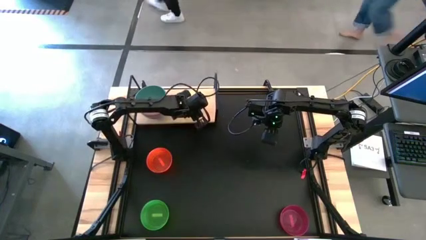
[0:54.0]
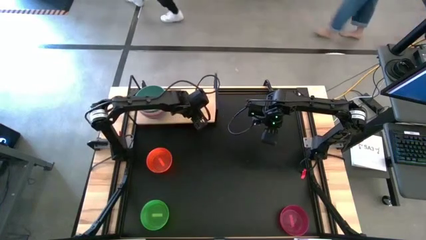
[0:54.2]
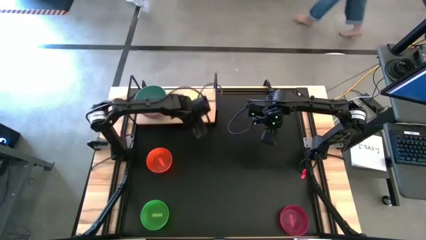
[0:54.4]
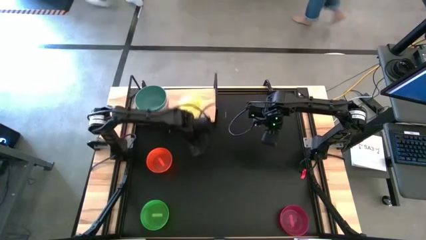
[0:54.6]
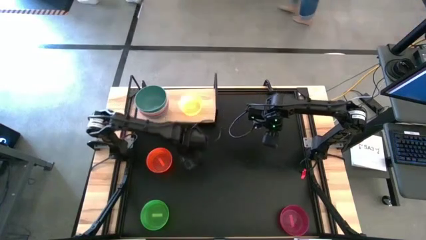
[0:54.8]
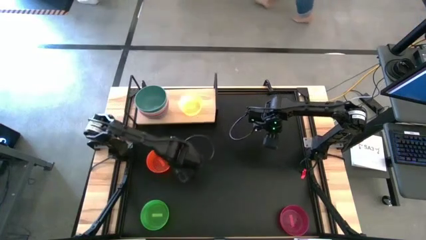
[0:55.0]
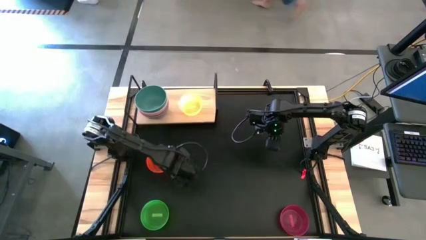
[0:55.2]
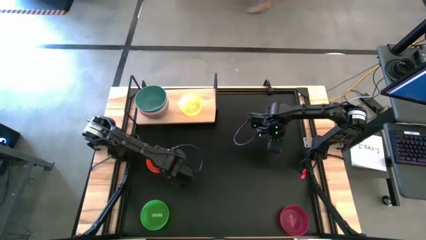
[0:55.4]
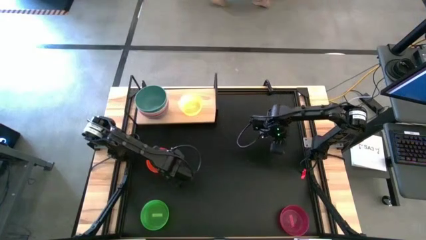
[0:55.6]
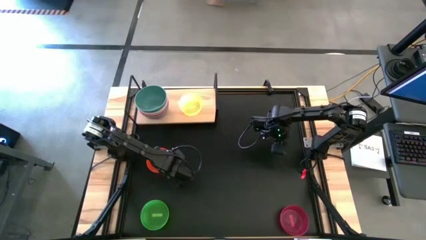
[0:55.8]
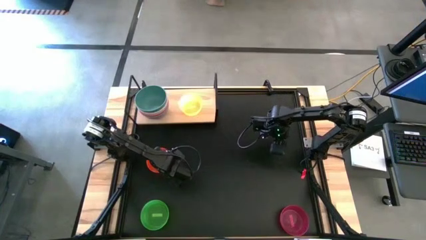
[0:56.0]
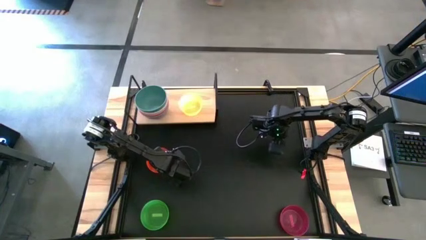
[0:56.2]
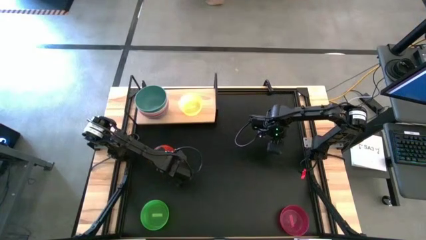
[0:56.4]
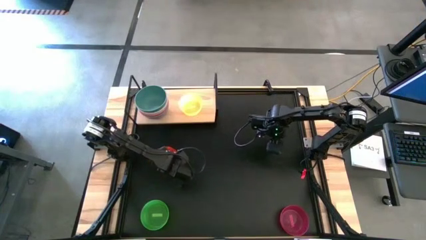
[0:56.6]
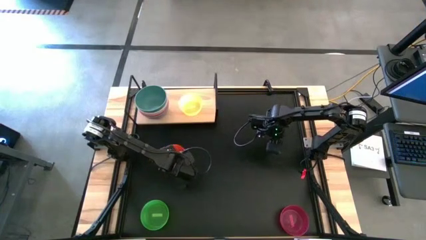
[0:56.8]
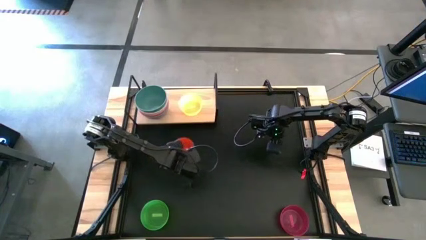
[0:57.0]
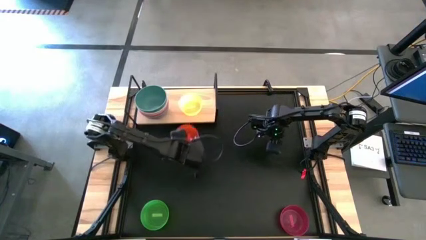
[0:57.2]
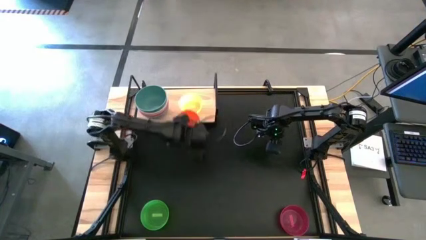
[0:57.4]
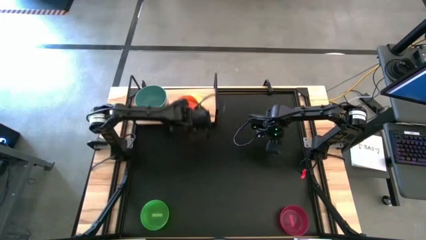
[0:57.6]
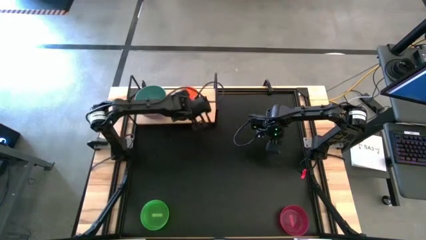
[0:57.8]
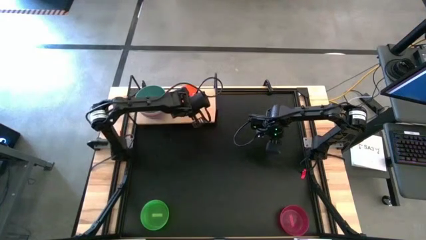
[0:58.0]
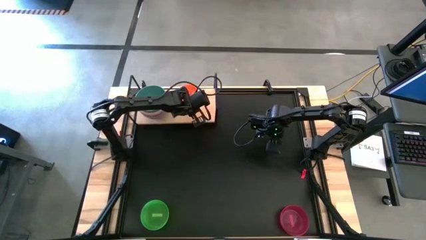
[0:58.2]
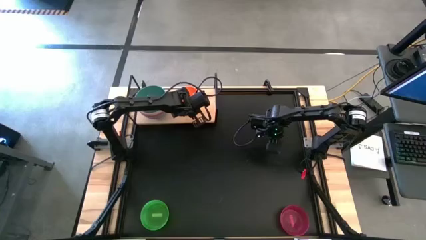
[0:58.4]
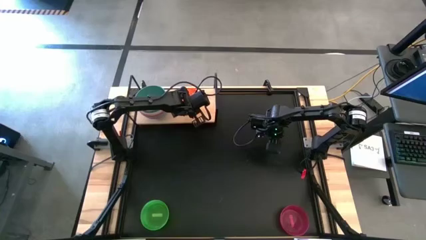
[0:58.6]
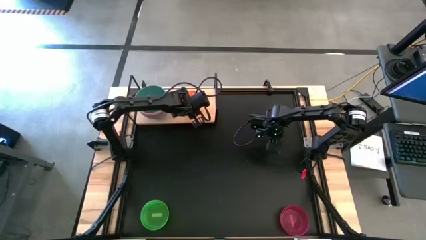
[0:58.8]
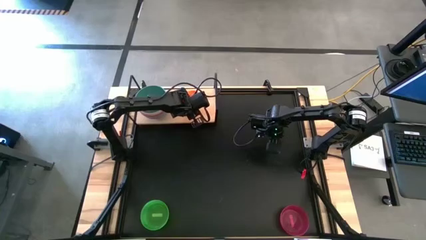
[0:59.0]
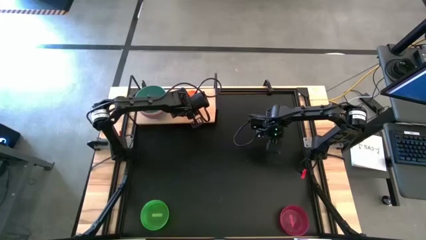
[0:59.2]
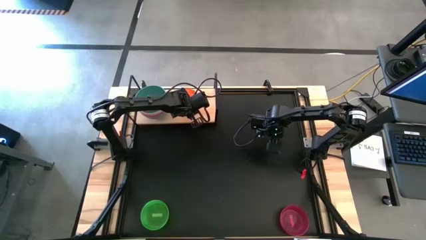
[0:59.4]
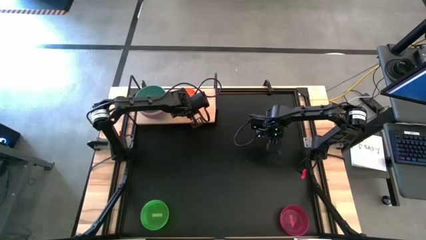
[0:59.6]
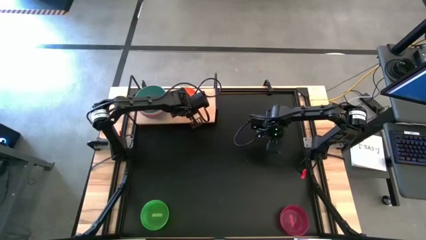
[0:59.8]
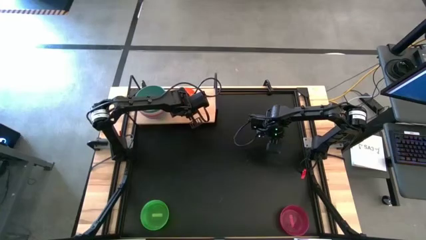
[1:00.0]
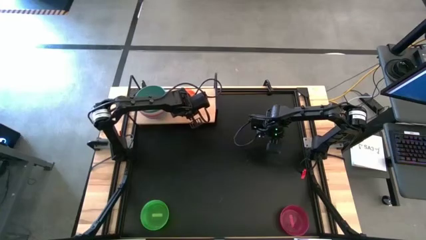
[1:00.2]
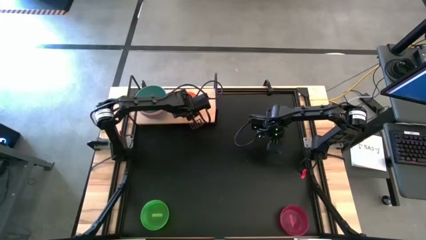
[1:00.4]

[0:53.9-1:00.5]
Task: Place and stack bowls onto a shelf
Stack the orange bowl on top of the yellow bowl on the shelf

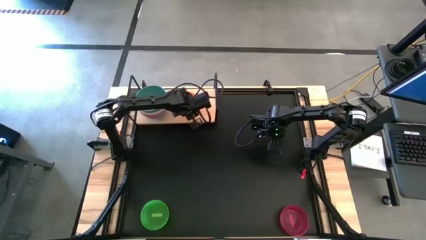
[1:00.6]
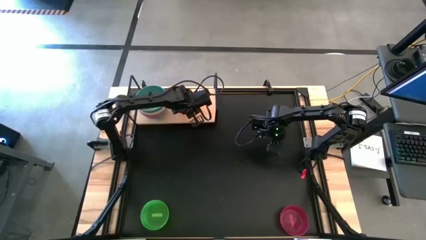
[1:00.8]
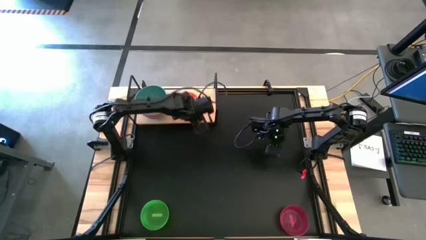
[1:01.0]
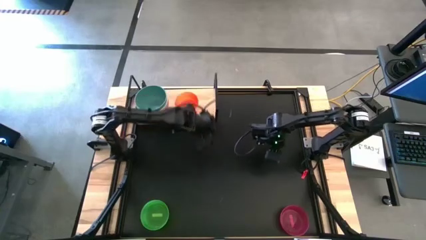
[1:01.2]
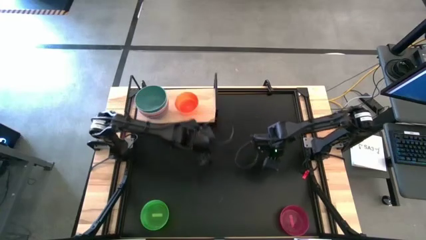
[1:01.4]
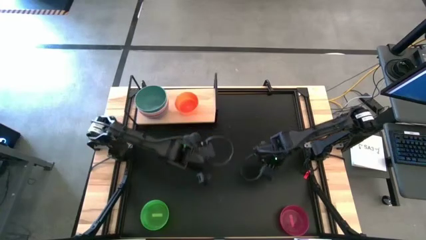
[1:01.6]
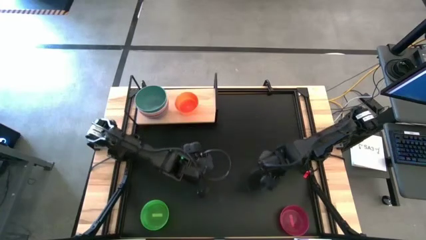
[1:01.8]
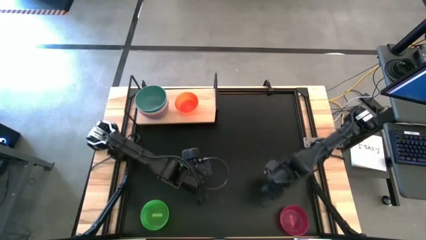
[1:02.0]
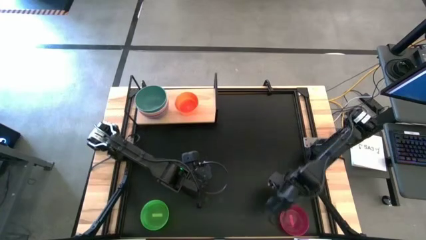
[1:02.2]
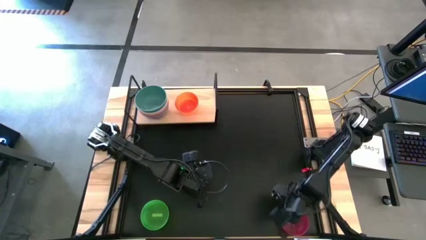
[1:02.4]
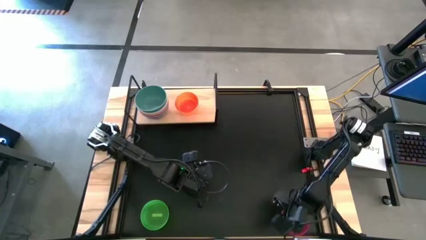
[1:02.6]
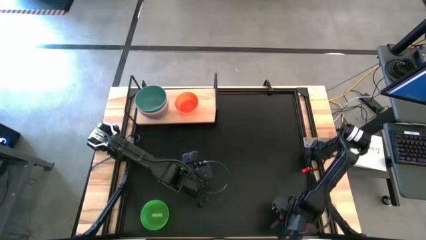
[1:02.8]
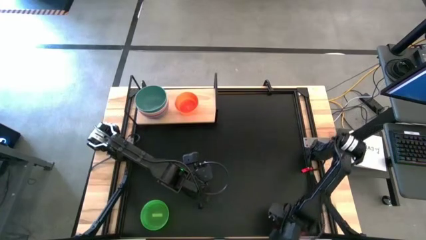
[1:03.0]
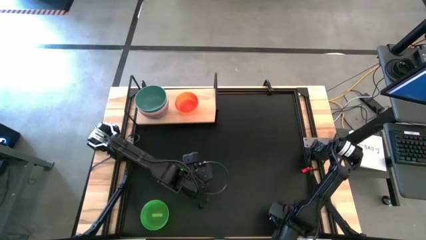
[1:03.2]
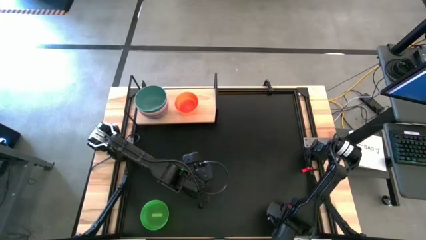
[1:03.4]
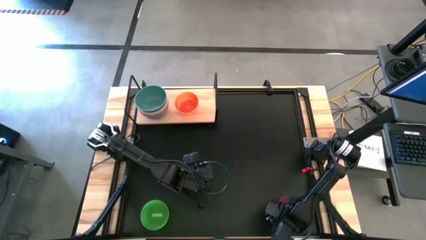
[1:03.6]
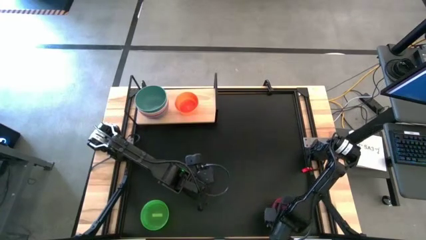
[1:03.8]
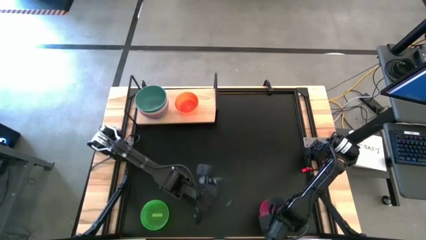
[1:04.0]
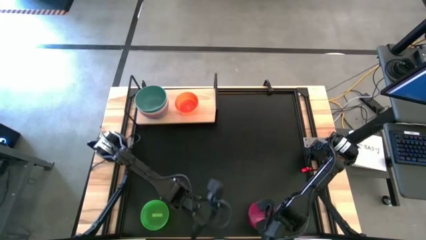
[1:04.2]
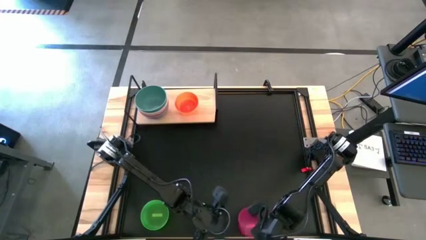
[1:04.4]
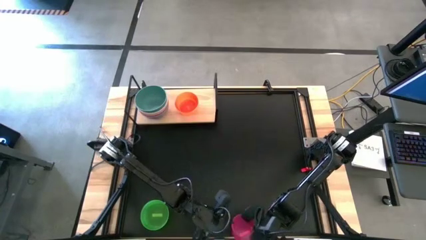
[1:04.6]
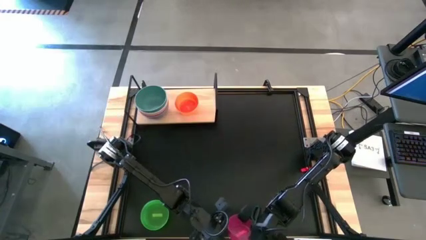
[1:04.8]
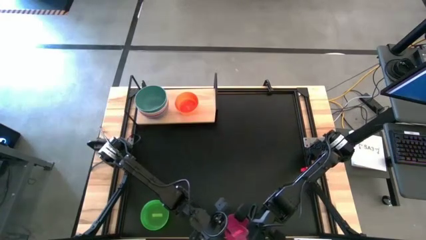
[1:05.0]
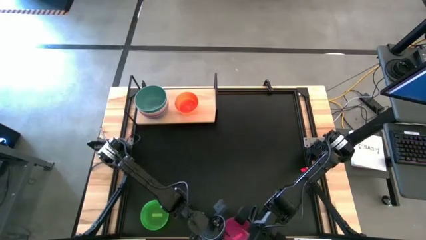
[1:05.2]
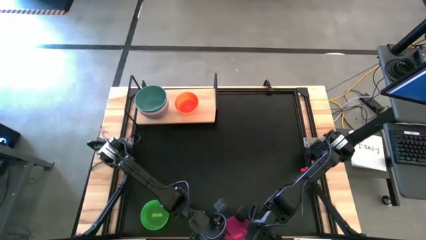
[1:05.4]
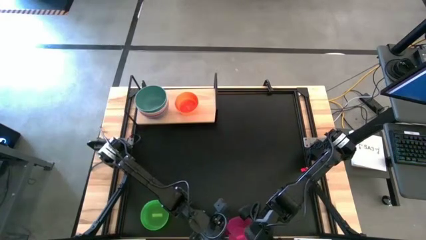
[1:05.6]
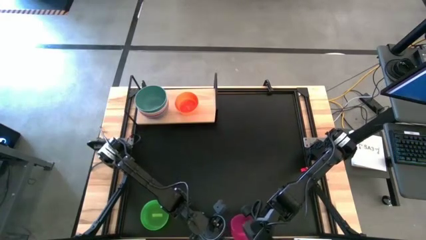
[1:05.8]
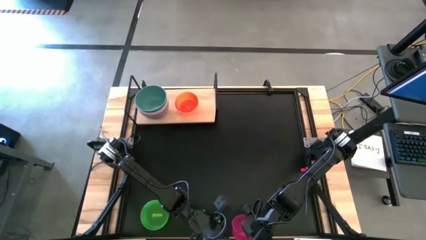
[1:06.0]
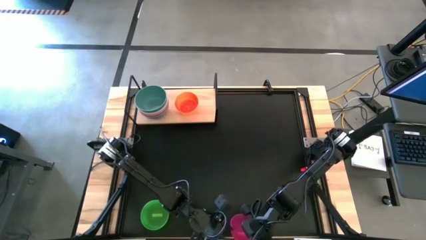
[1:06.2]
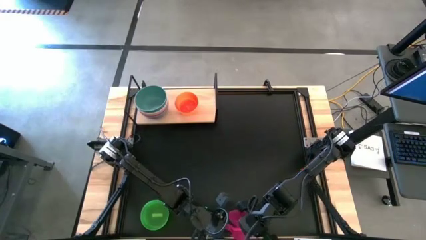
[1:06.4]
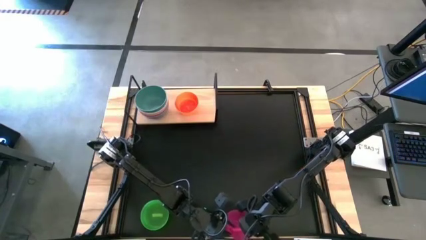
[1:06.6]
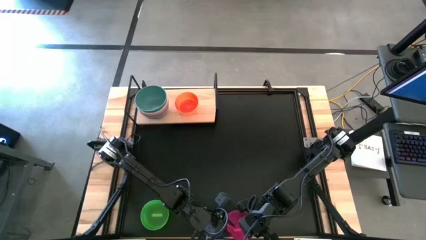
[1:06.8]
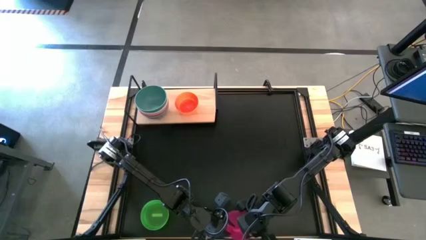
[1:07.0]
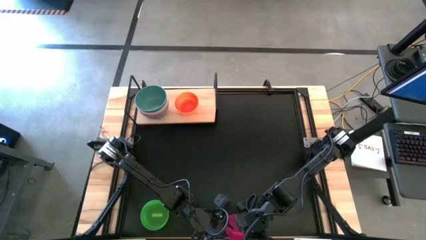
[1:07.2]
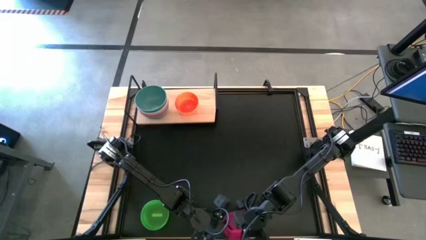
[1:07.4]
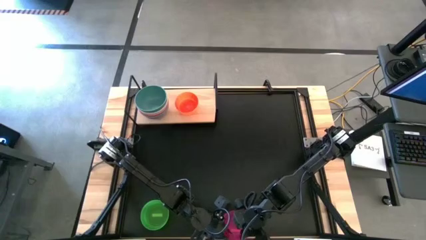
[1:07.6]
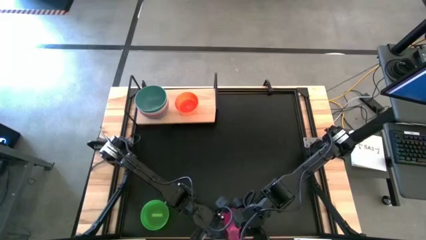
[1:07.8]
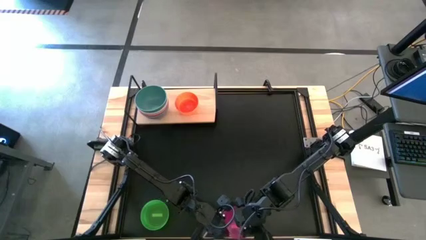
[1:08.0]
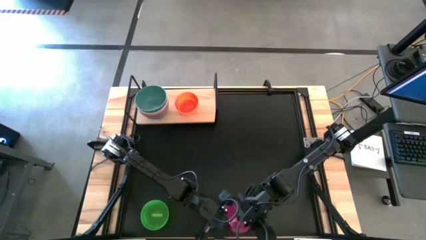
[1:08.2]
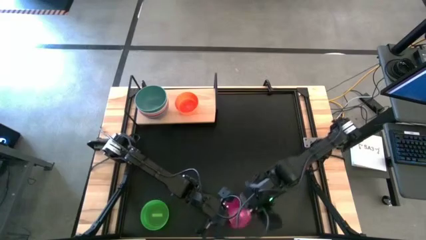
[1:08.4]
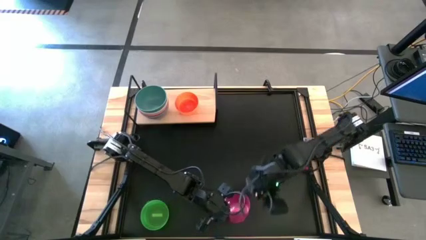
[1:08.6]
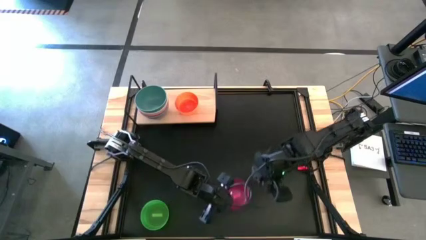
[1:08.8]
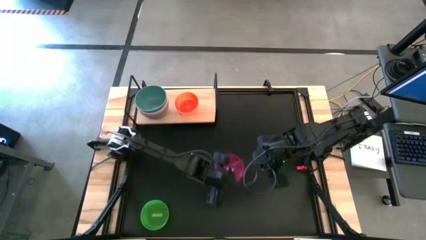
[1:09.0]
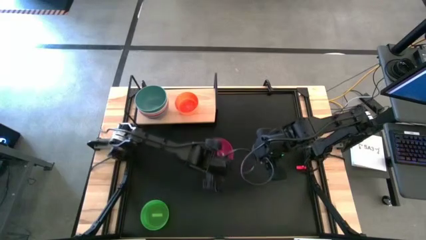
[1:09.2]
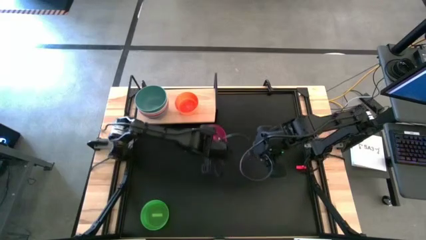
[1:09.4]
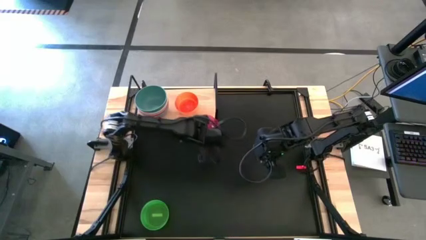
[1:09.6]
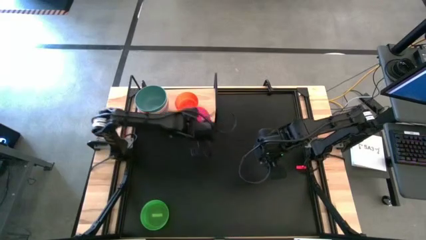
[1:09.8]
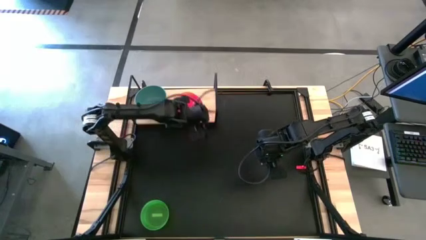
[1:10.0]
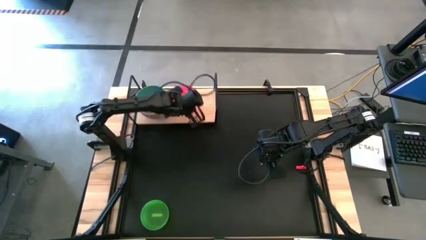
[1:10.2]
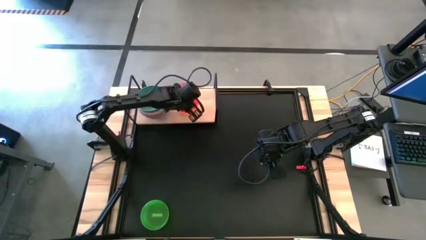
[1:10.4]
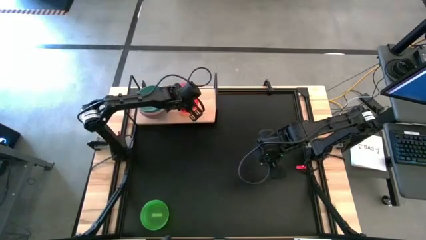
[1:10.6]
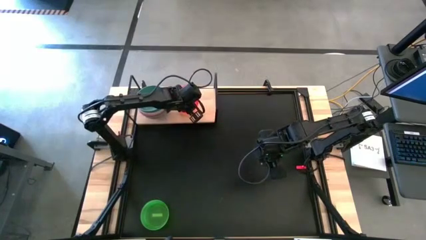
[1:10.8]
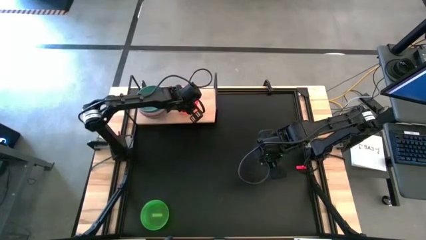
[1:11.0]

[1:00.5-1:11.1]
Stack the red bowl on top of the orange bowl on the shelf
